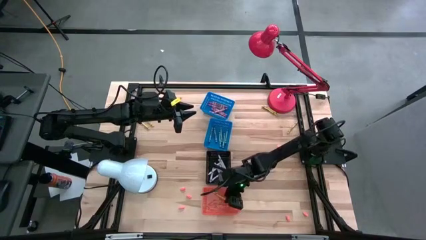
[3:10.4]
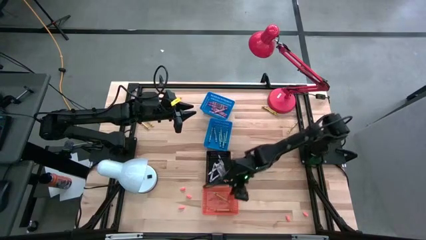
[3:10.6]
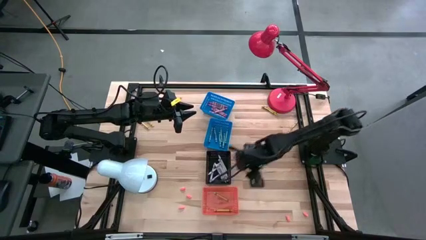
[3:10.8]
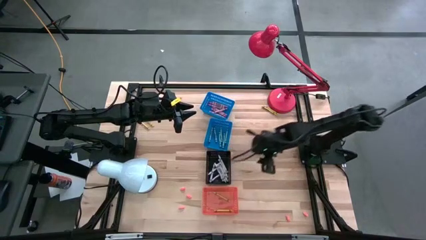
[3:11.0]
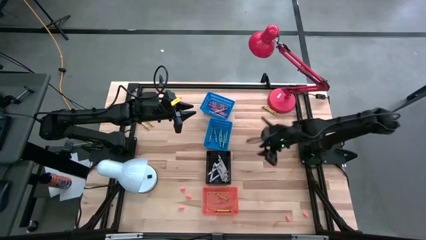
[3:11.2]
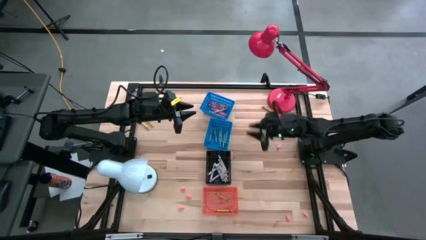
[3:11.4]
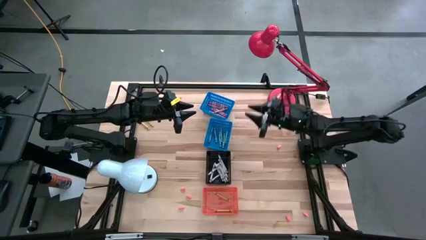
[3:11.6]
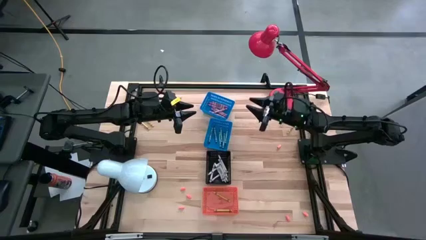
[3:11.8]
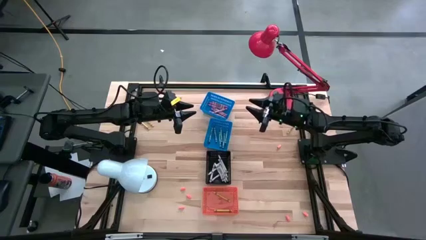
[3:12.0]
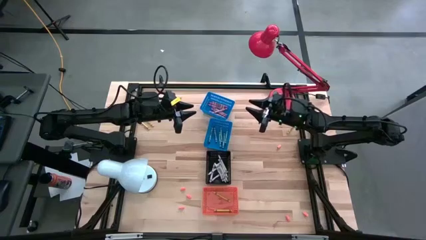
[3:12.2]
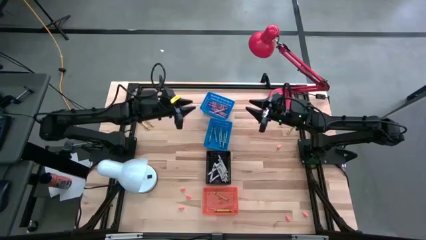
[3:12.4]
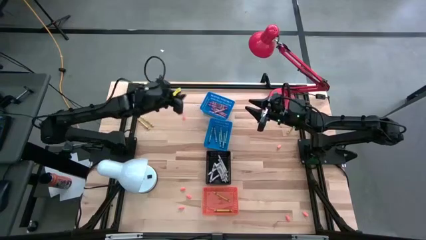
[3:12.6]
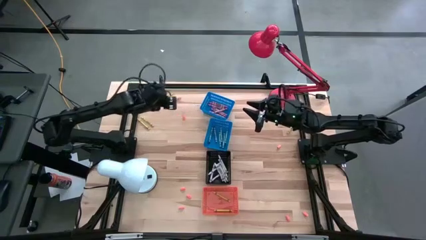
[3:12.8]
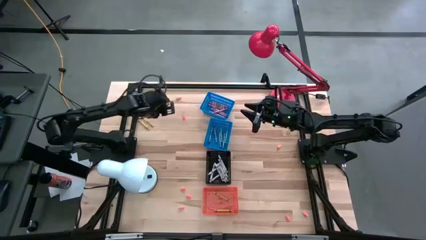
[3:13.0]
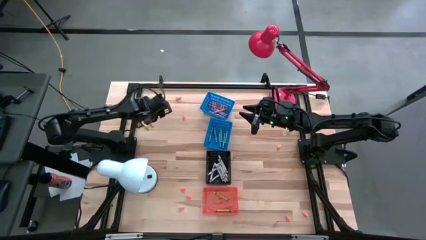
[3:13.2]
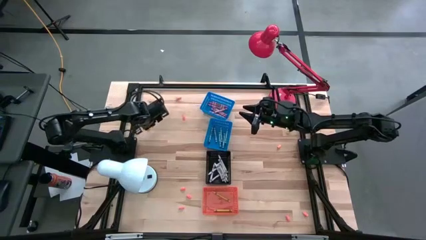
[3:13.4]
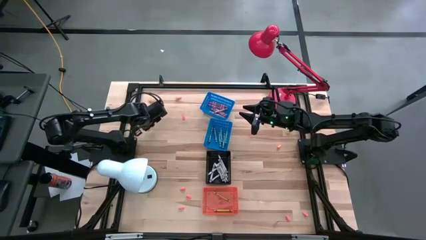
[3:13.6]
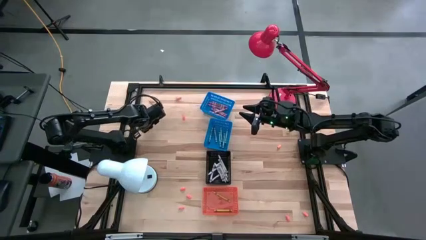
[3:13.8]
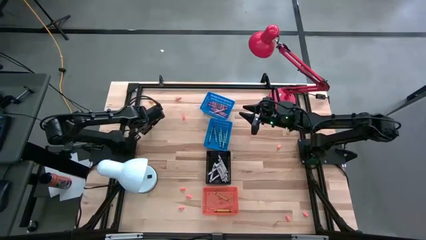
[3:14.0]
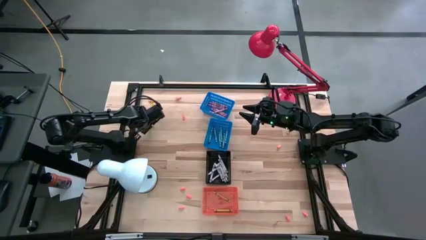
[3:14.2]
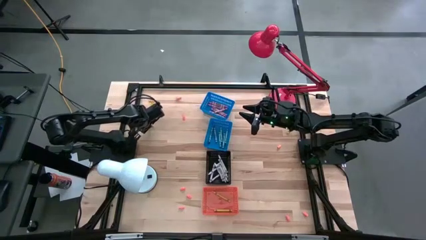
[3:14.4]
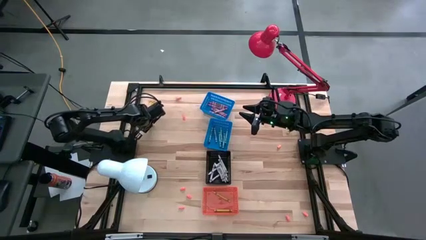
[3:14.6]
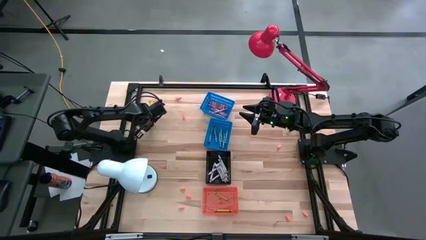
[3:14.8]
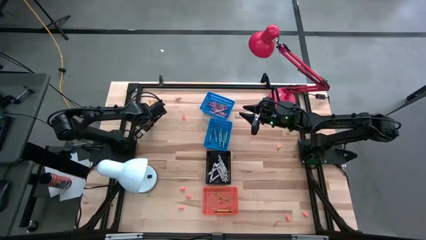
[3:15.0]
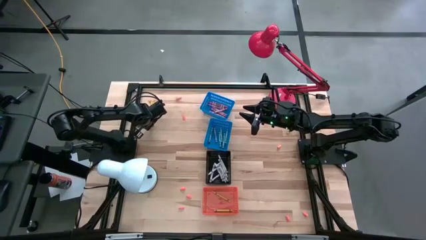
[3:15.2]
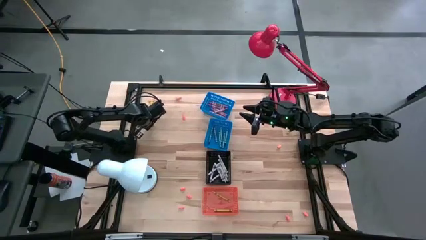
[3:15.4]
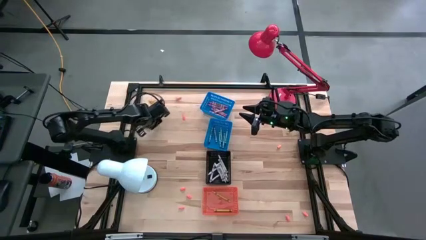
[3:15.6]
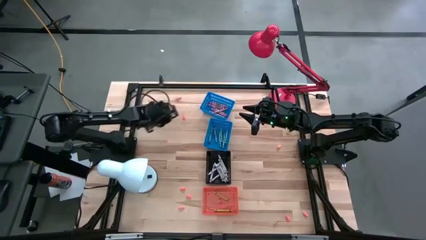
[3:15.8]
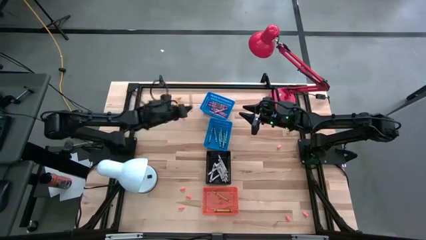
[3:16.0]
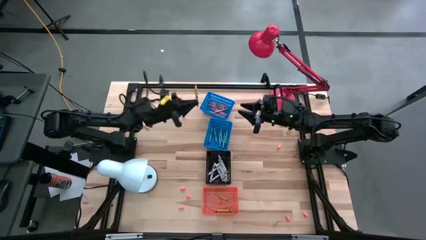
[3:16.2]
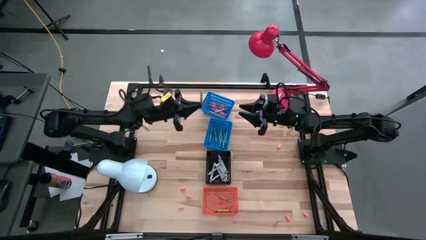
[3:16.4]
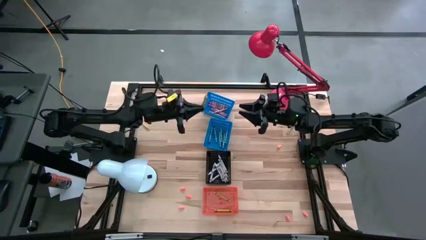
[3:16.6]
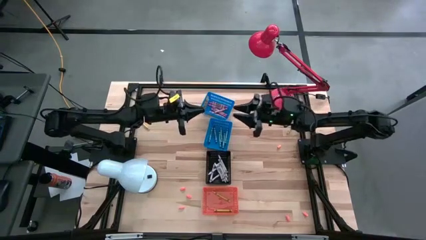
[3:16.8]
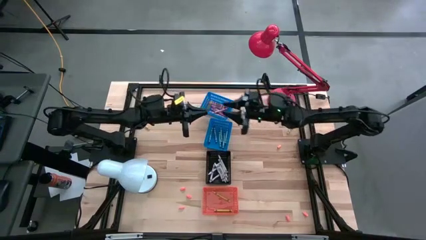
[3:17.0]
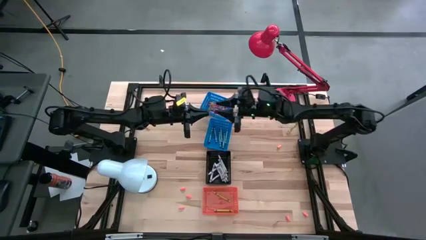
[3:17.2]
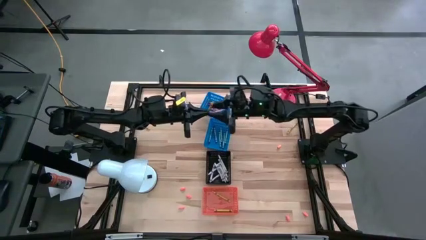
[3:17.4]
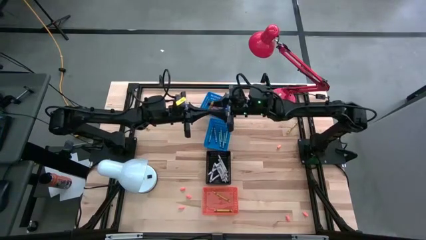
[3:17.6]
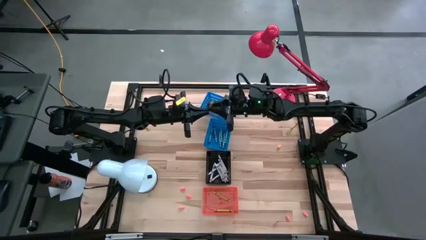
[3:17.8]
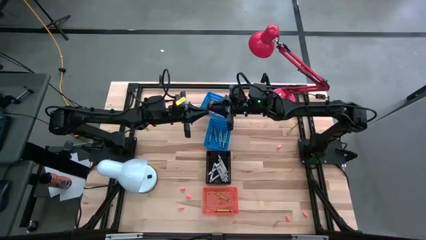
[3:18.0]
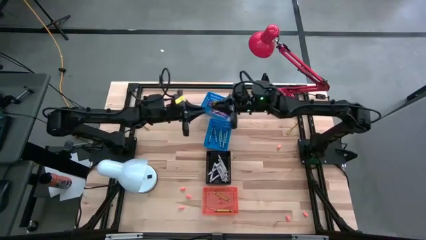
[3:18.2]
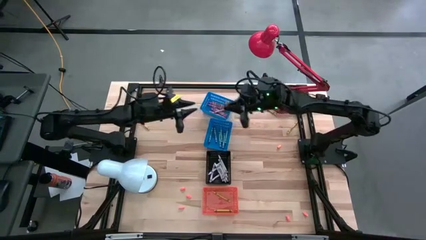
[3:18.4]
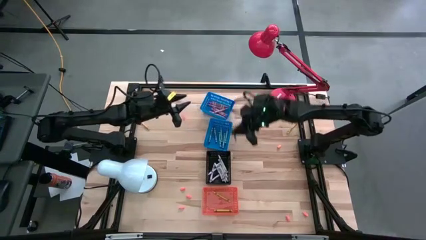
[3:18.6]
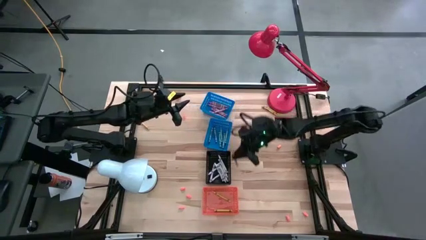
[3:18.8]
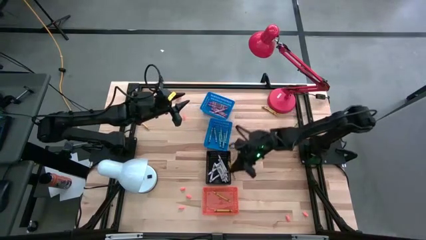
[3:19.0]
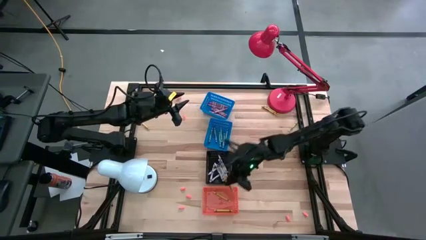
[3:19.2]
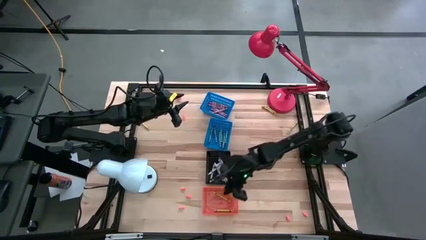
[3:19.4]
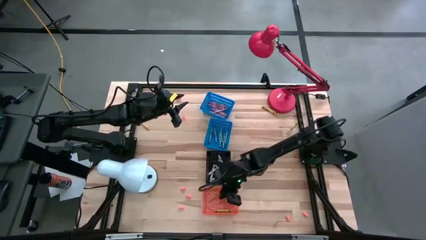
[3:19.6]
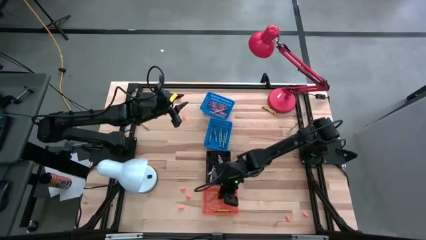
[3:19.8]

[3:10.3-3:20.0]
Task: Sort crayons
Put the yellow crayon into the orange bin

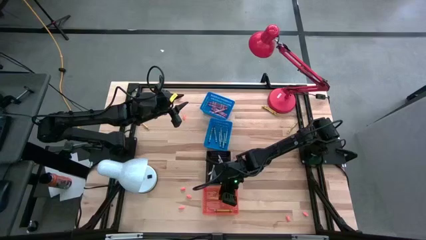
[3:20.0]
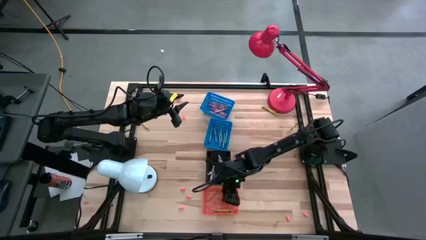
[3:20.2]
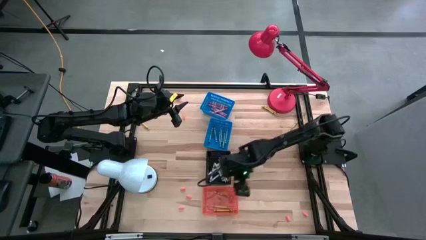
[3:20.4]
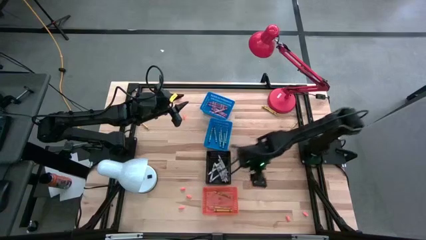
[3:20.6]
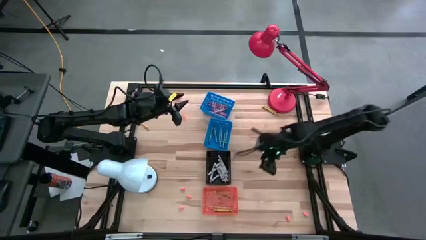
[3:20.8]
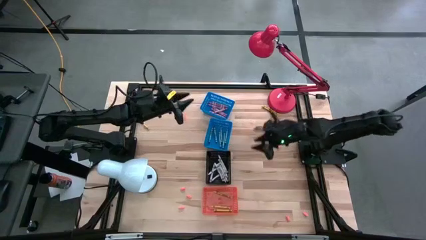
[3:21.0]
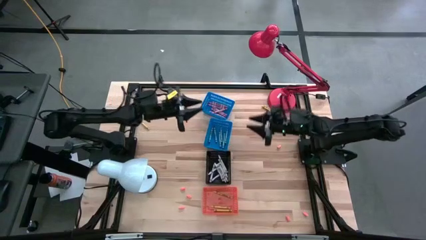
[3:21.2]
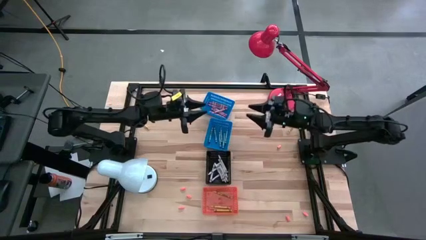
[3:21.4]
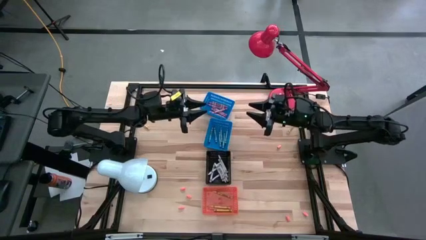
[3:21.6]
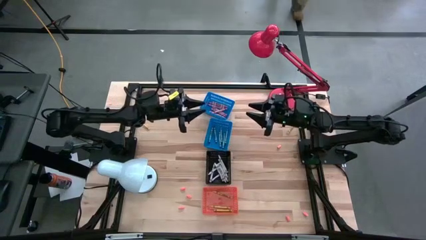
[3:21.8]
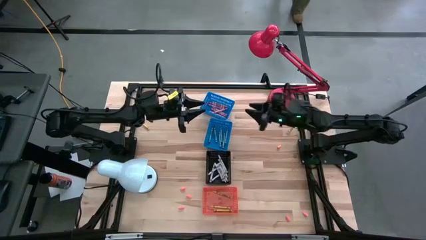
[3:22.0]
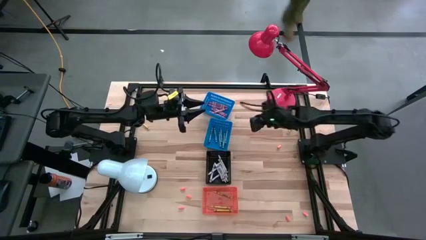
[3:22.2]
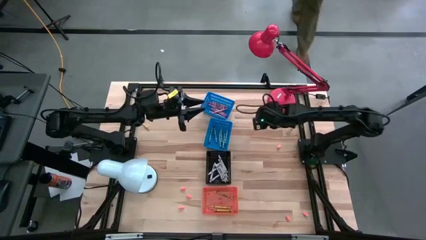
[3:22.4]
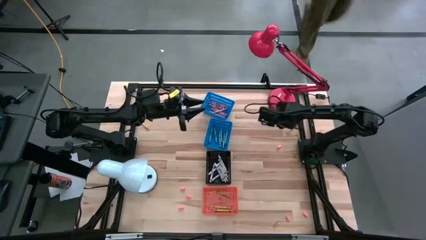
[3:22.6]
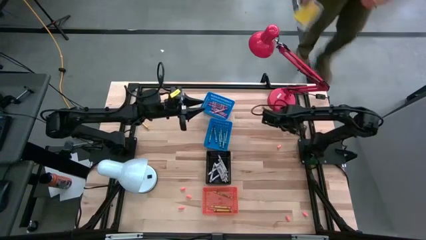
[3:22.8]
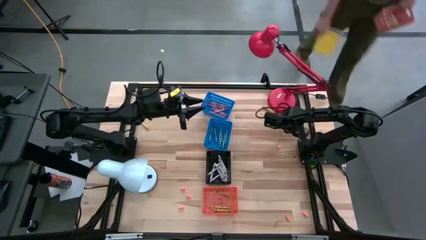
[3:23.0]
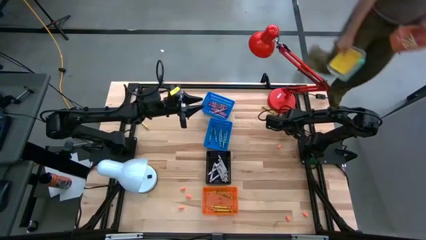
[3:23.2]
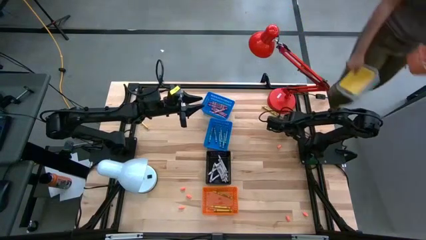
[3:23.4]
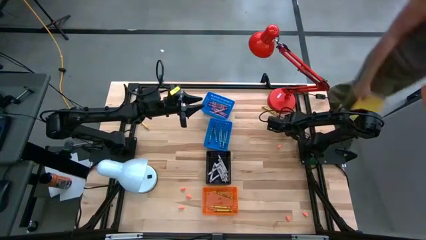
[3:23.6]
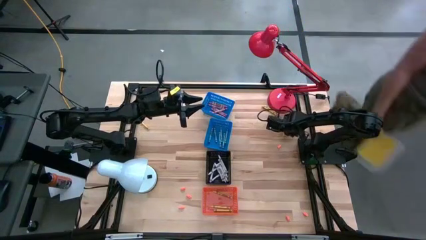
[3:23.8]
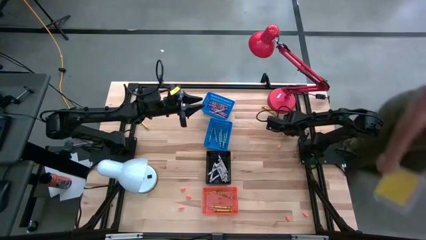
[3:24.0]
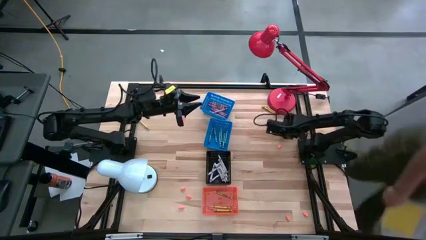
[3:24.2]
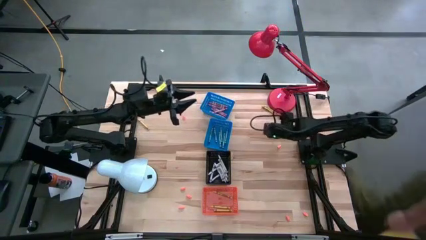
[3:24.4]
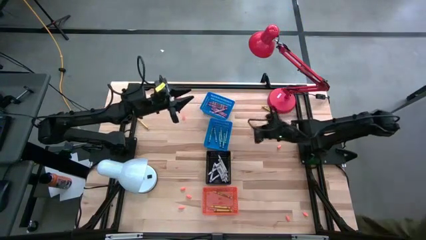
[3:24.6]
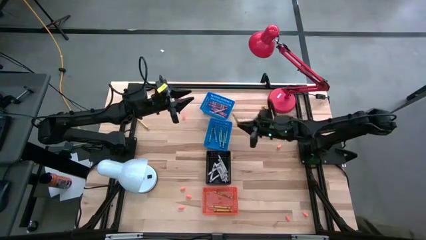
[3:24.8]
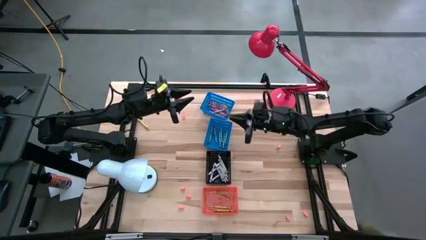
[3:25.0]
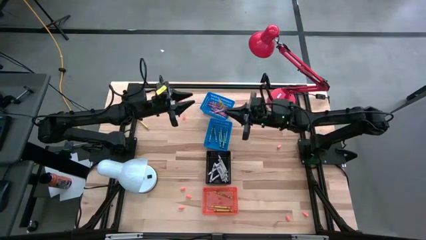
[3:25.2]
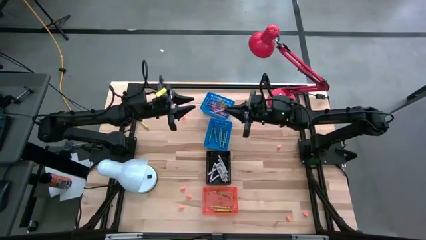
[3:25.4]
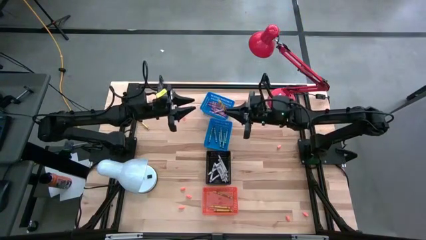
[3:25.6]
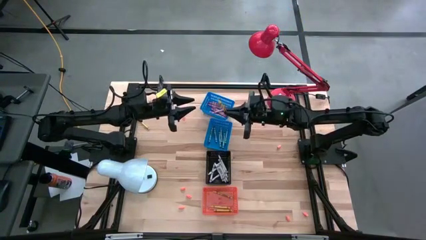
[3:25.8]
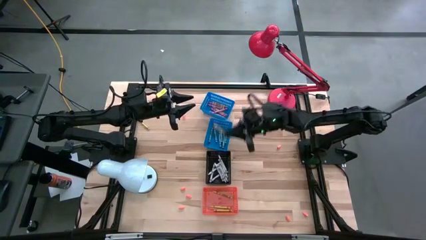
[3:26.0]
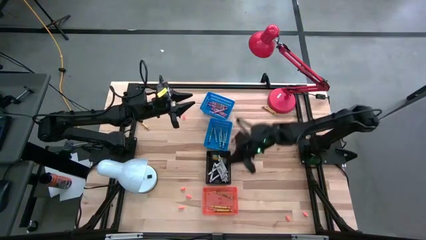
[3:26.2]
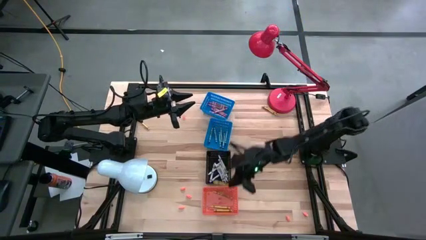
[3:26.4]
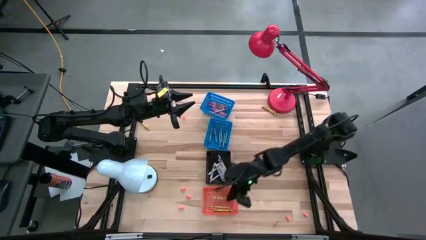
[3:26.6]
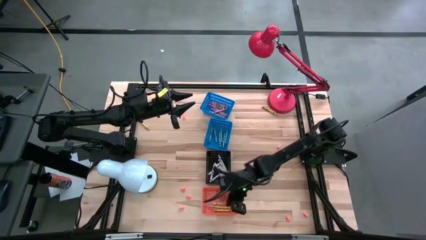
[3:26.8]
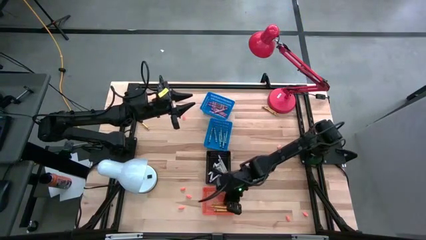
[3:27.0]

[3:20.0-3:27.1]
Put the yellow crayon into the orange bin
